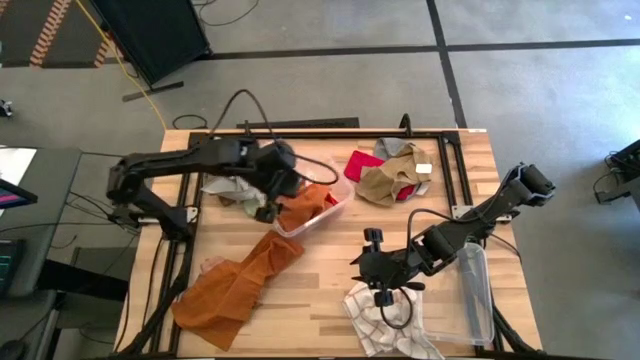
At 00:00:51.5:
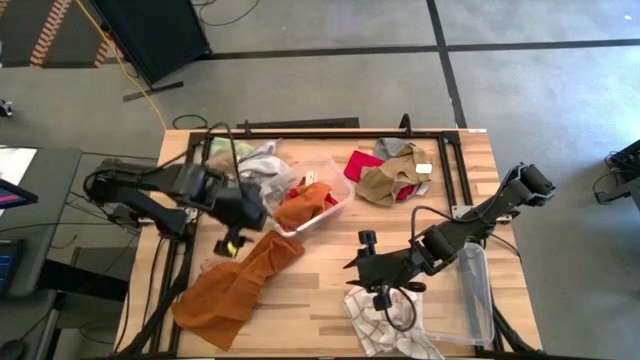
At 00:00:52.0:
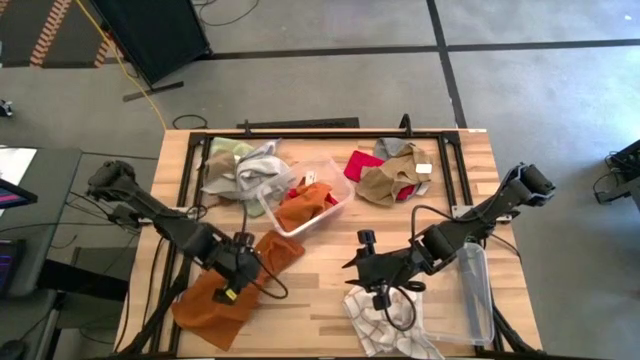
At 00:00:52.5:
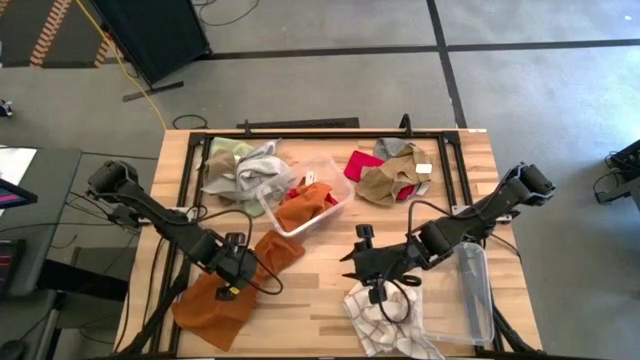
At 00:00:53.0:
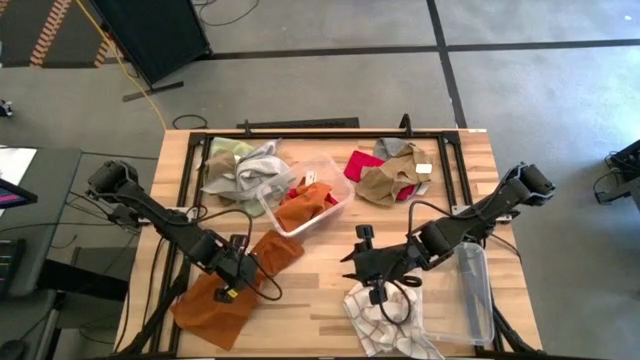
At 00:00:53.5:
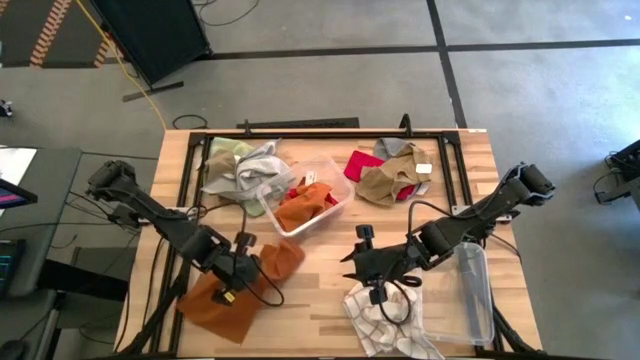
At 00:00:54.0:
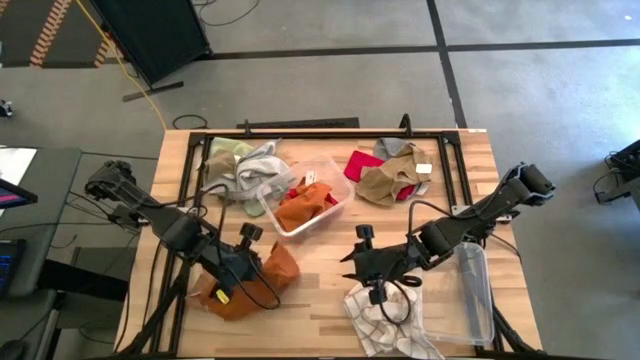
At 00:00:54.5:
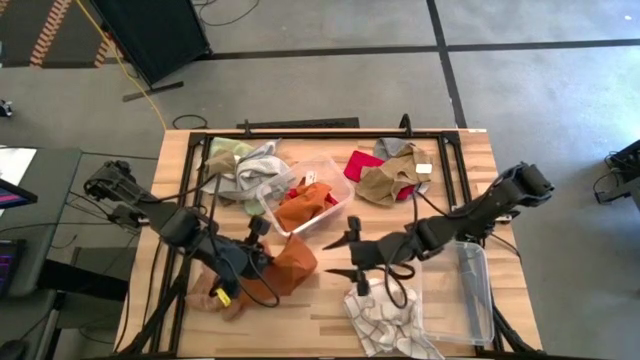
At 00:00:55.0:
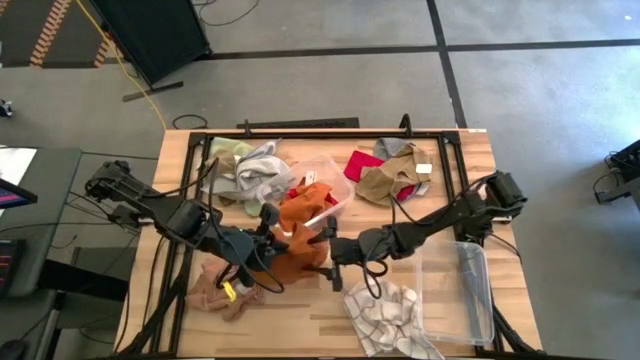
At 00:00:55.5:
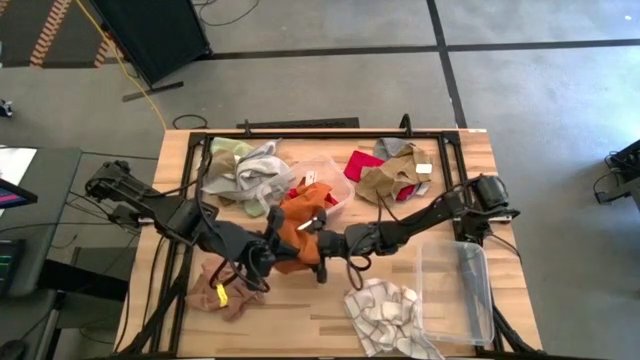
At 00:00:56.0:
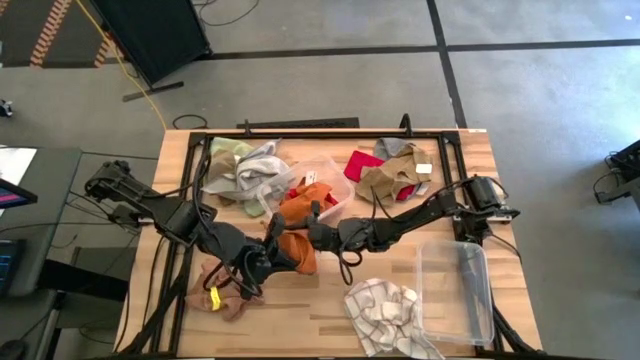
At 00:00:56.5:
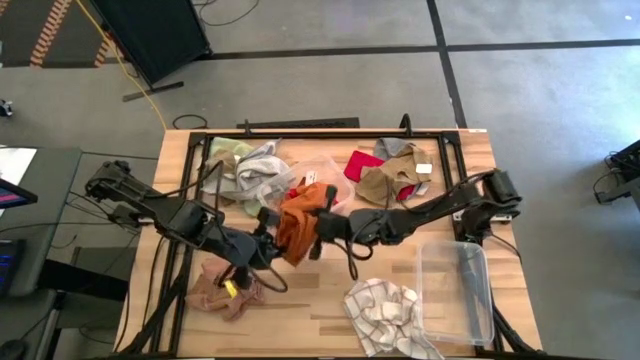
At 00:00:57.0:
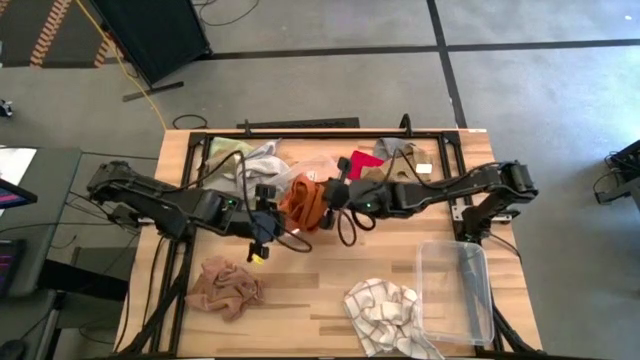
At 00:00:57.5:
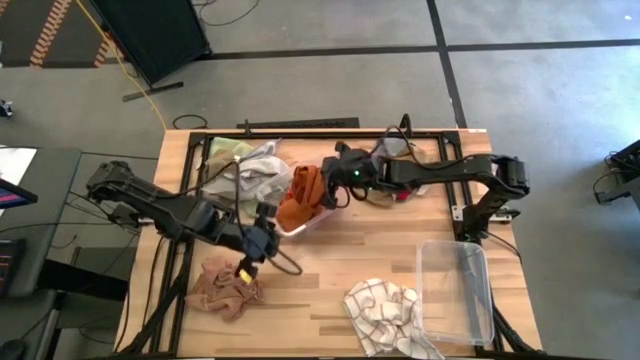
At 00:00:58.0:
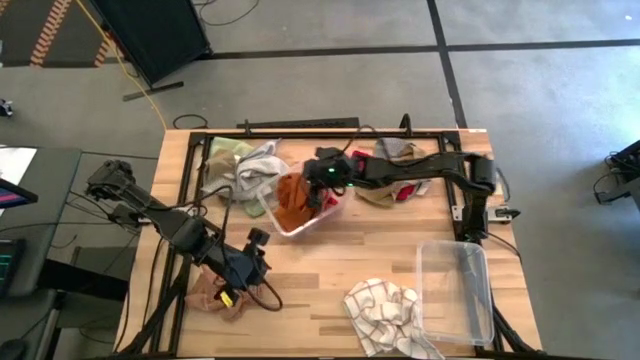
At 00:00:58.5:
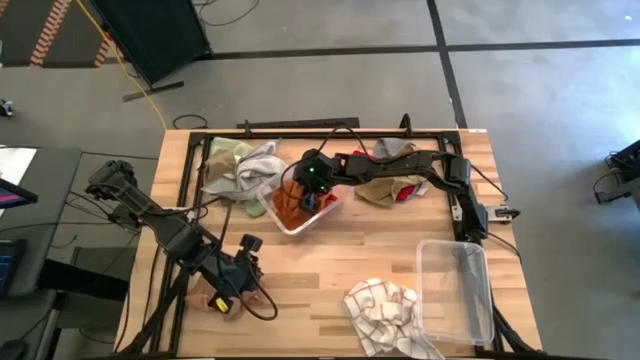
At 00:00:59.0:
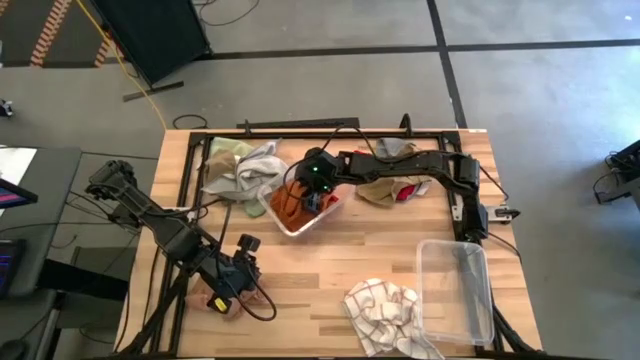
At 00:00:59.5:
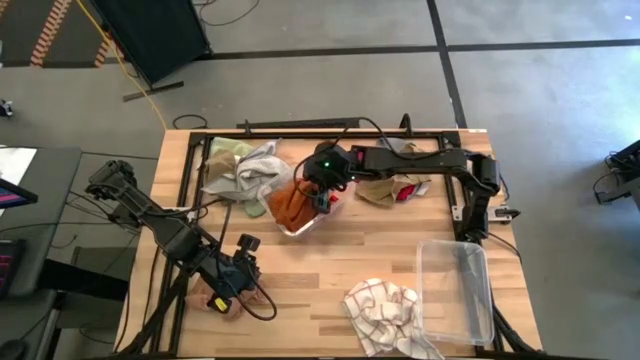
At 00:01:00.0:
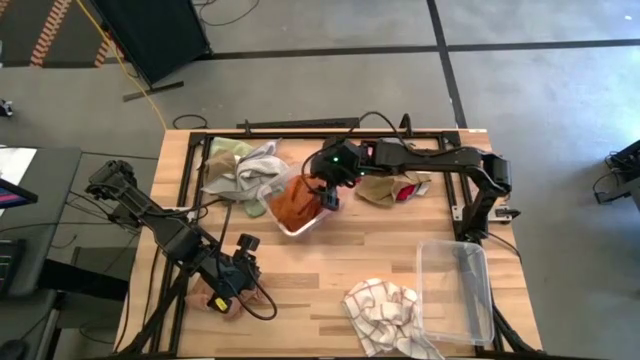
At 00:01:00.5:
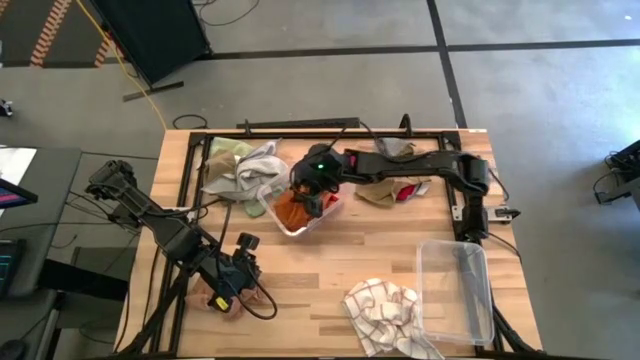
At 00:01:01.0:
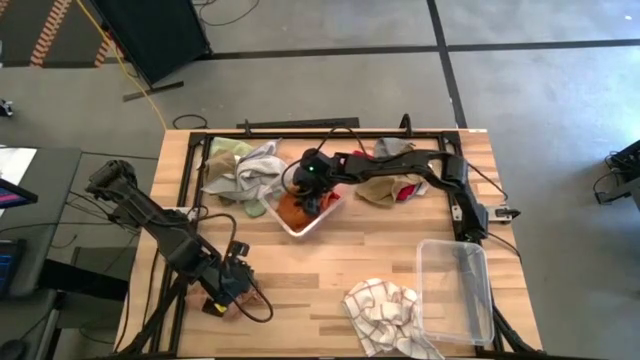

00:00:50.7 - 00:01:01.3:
Task: Sort towels by color in basket
Put the orange towel into the top transparent bin

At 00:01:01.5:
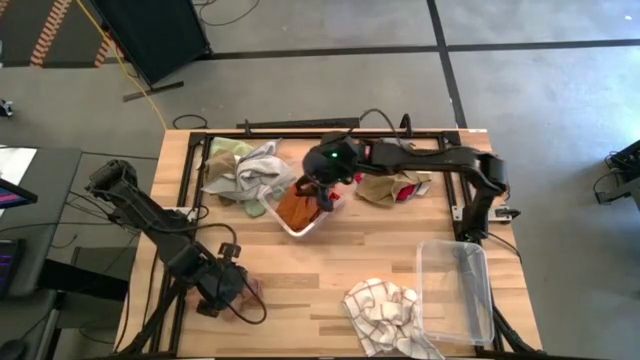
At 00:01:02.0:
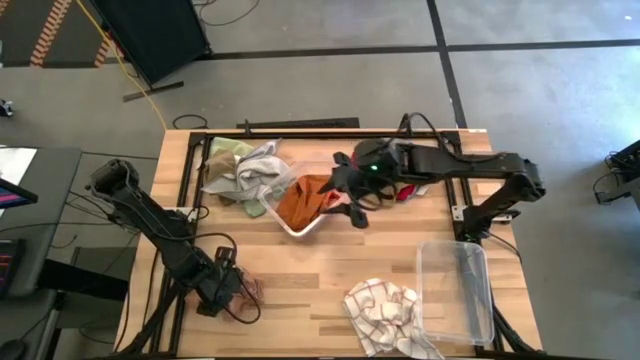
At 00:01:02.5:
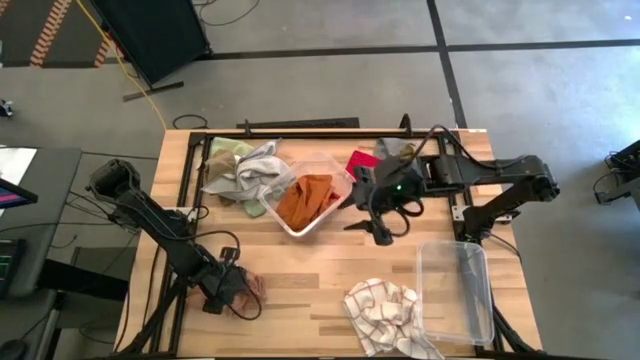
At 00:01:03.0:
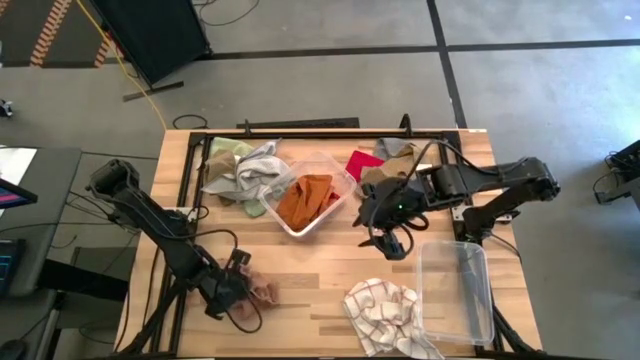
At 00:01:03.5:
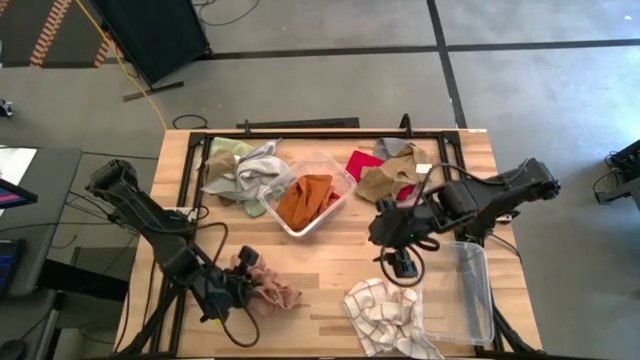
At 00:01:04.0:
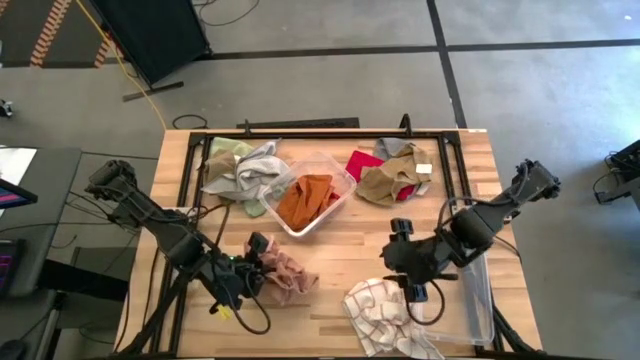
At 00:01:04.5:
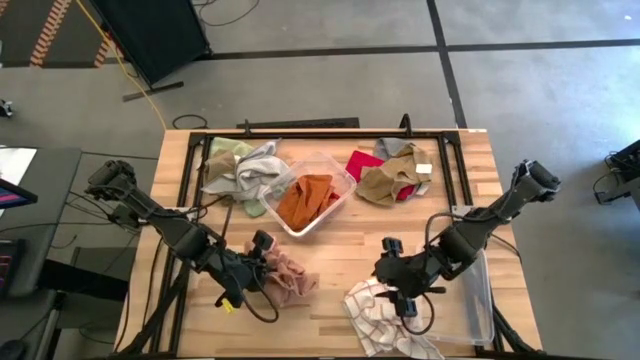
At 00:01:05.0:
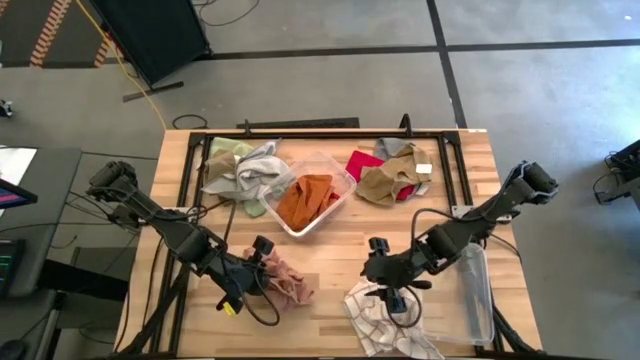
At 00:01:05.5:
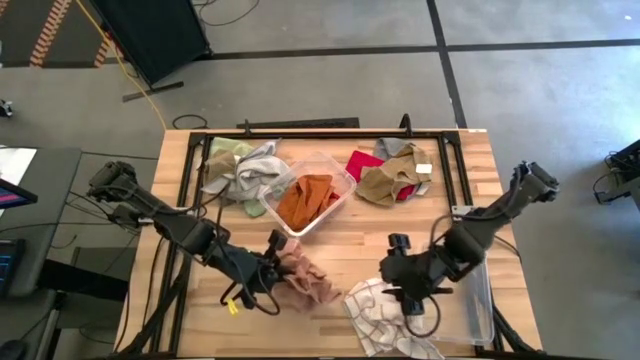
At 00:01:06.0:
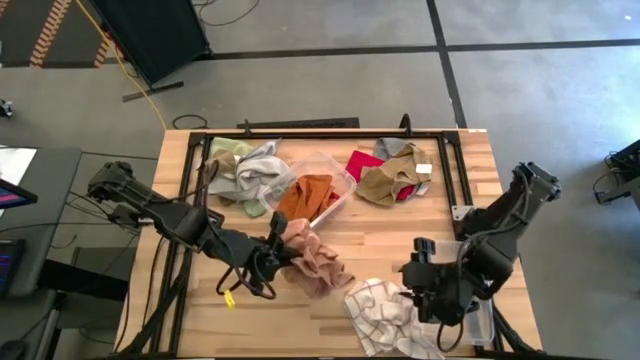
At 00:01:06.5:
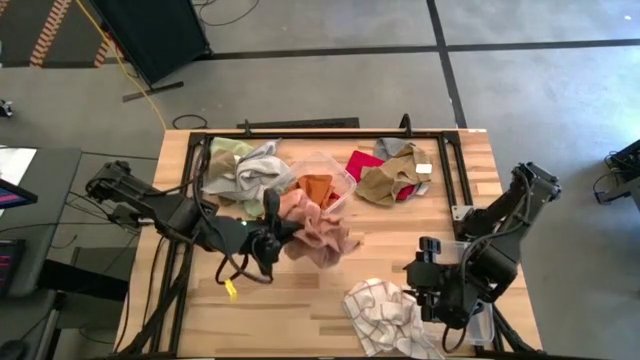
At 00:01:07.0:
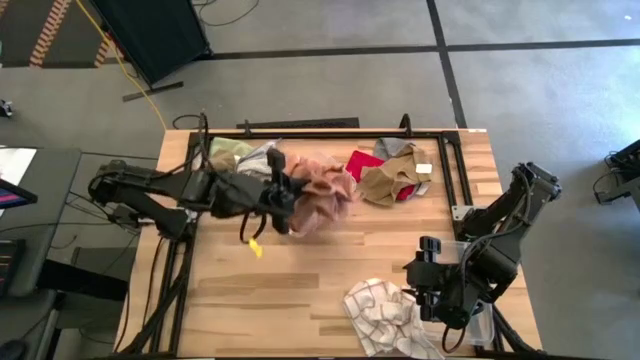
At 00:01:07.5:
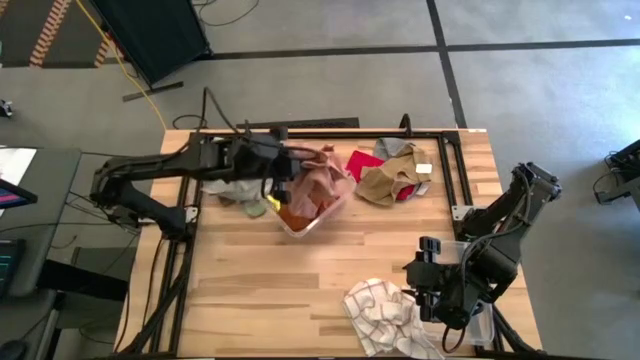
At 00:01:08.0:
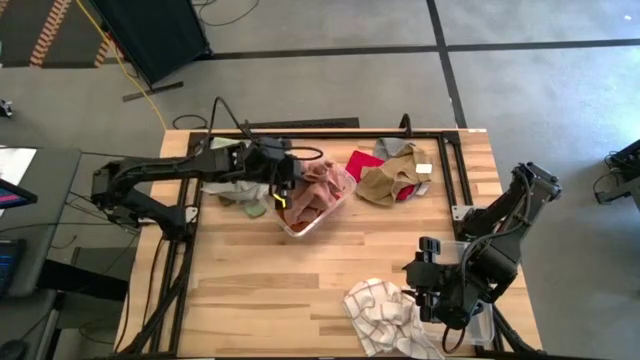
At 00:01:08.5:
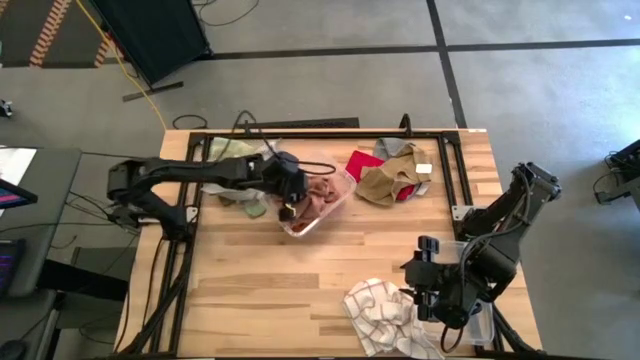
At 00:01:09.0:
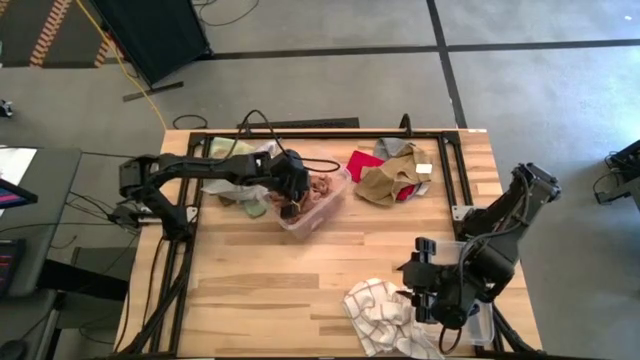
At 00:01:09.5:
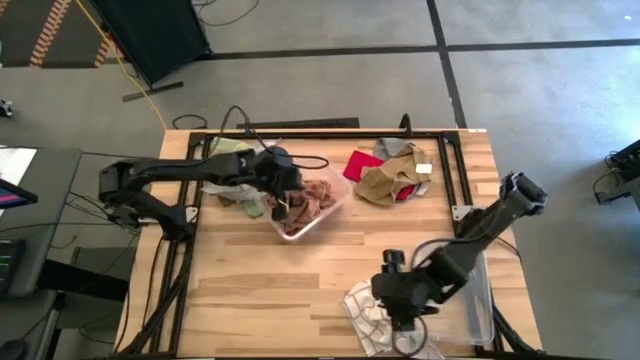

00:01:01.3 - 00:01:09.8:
Put the brown towel into the top transparent bin

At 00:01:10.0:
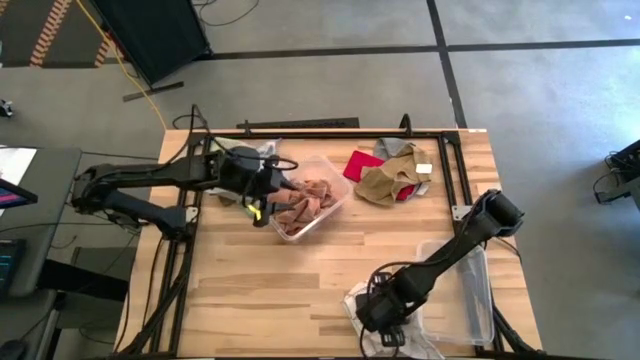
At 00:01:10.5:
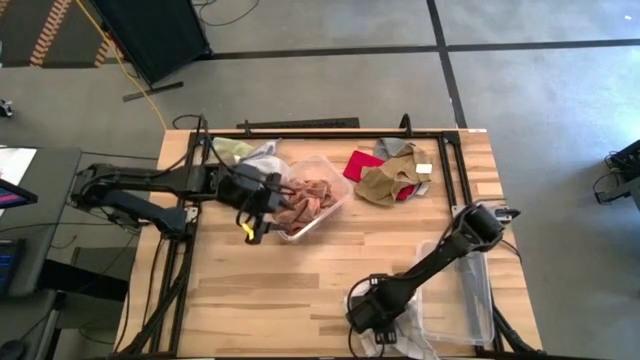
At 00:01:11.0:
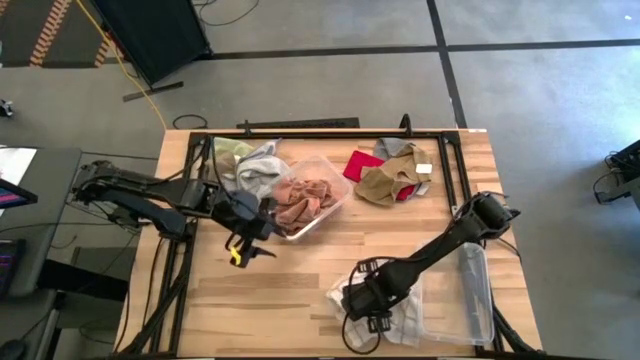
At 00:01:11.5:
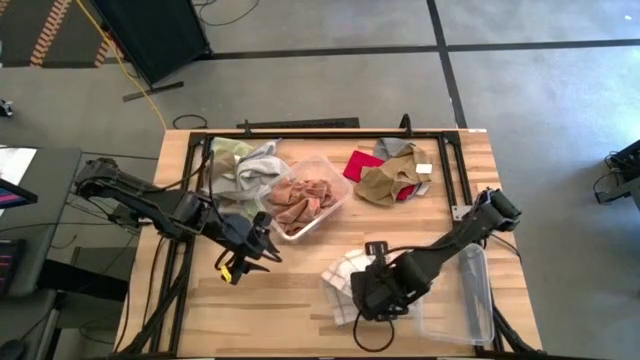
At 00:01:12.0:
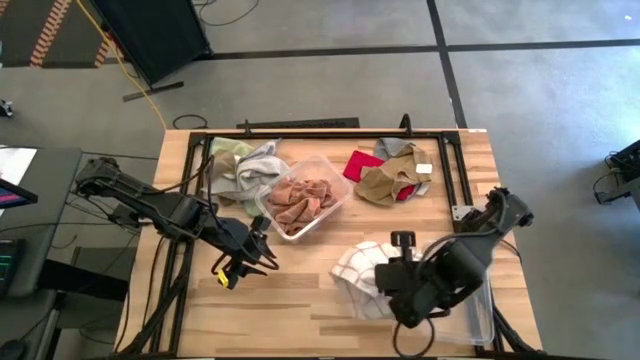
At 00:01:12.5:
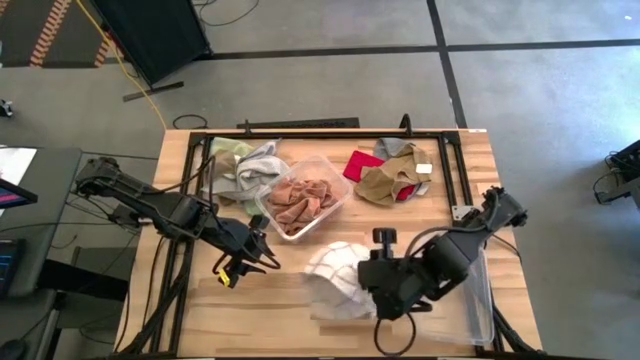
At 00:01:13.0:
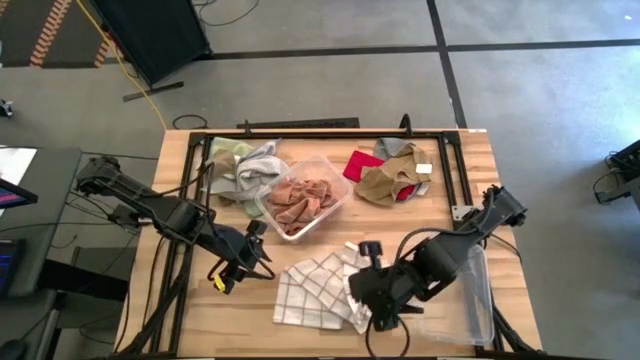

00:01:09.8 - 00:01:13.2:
Put the white patterned towel into the bottom transparent bin
